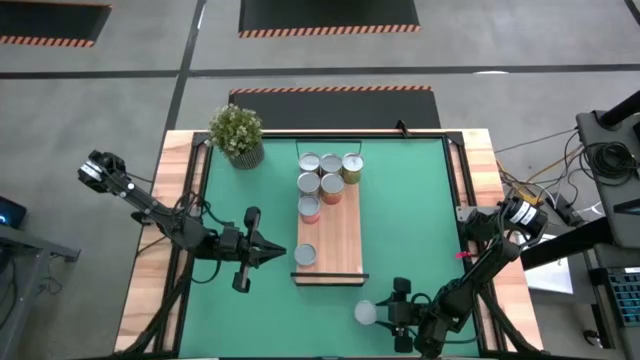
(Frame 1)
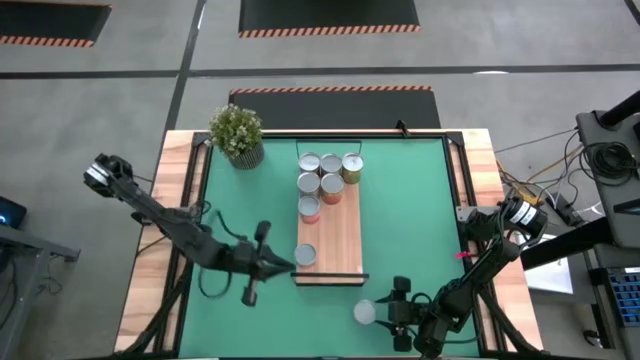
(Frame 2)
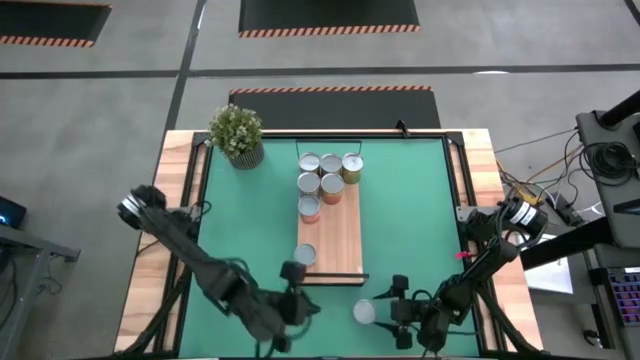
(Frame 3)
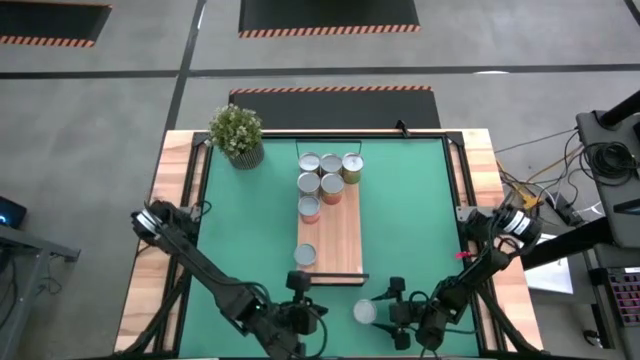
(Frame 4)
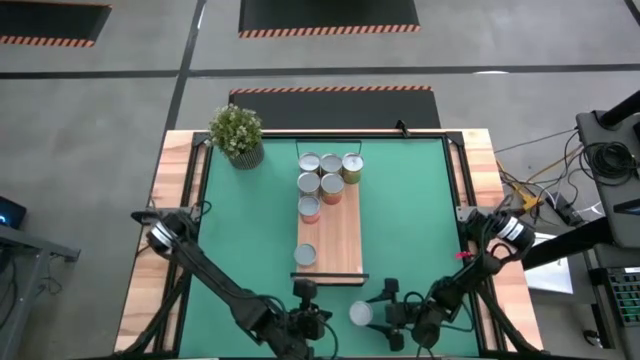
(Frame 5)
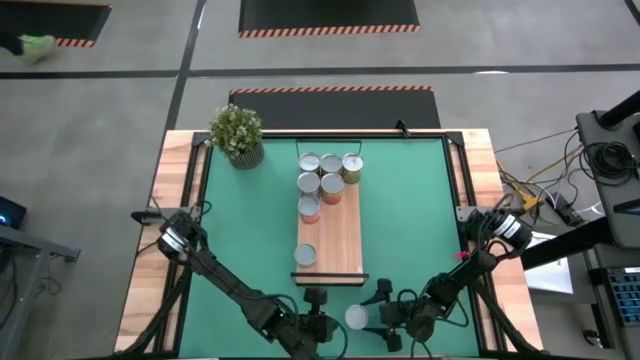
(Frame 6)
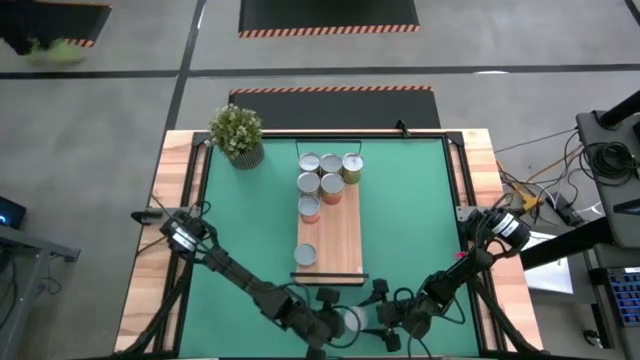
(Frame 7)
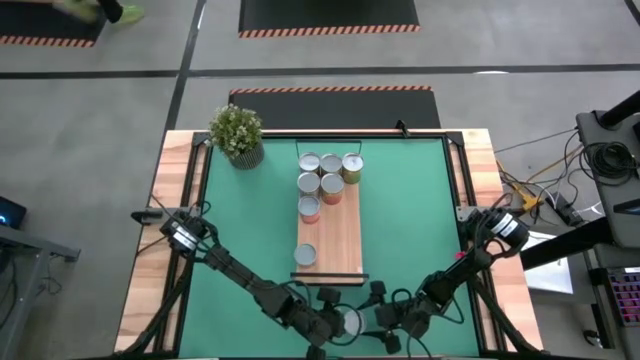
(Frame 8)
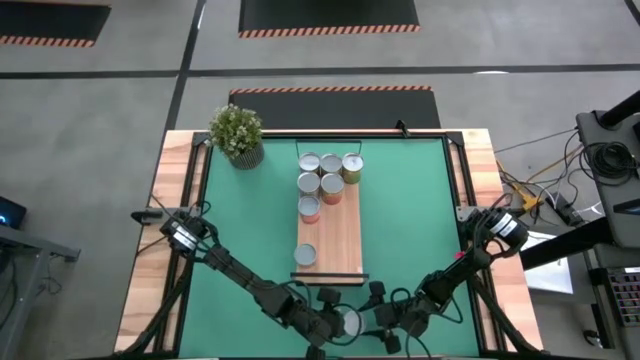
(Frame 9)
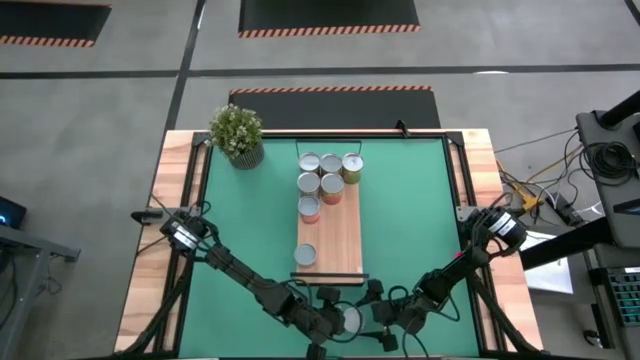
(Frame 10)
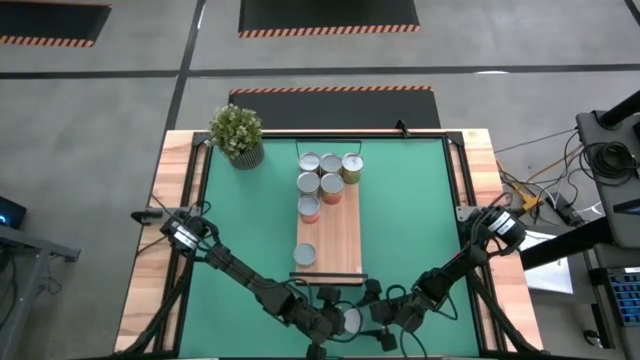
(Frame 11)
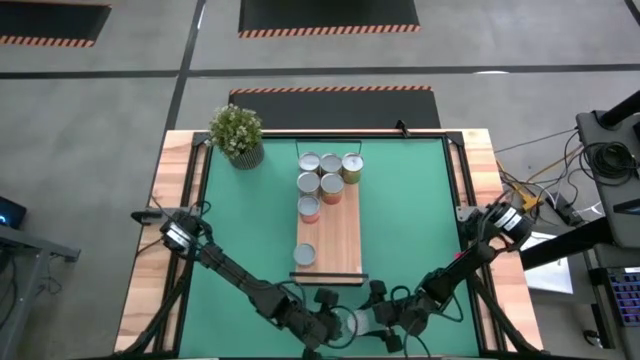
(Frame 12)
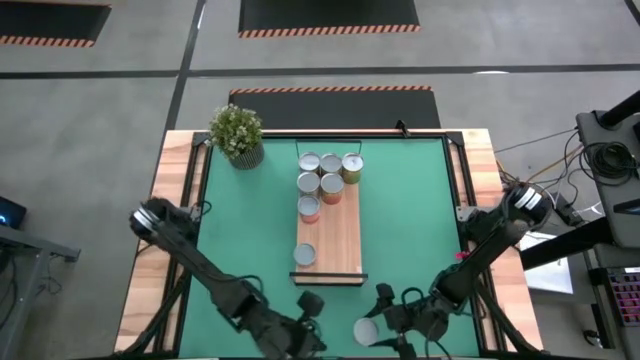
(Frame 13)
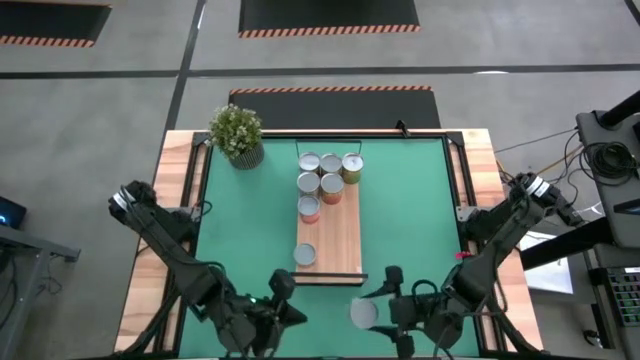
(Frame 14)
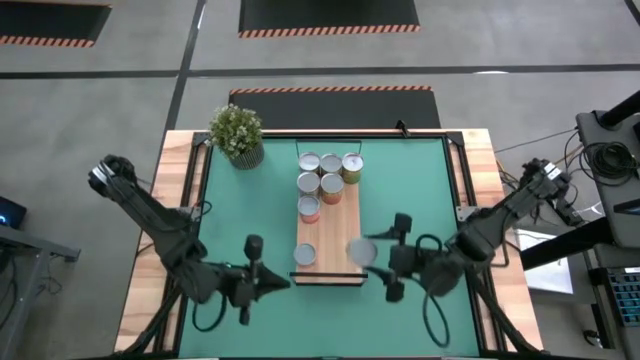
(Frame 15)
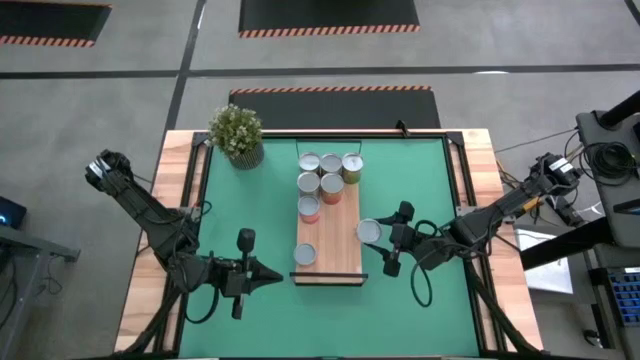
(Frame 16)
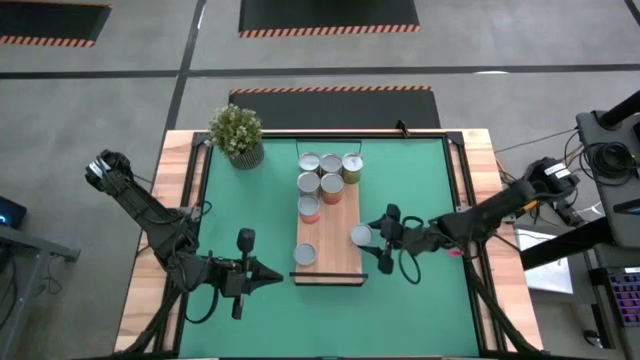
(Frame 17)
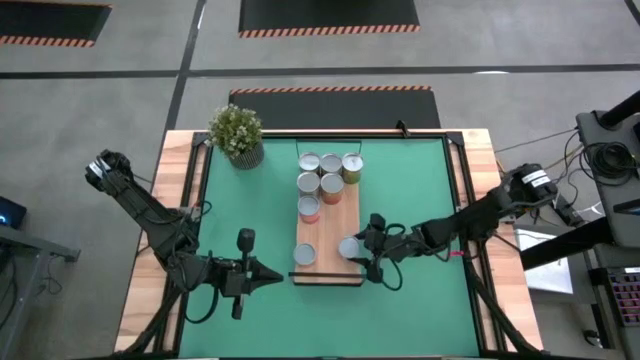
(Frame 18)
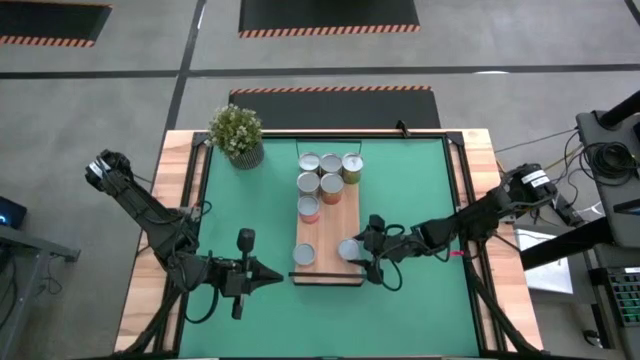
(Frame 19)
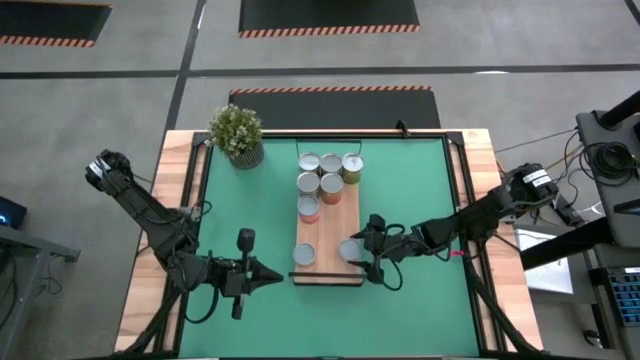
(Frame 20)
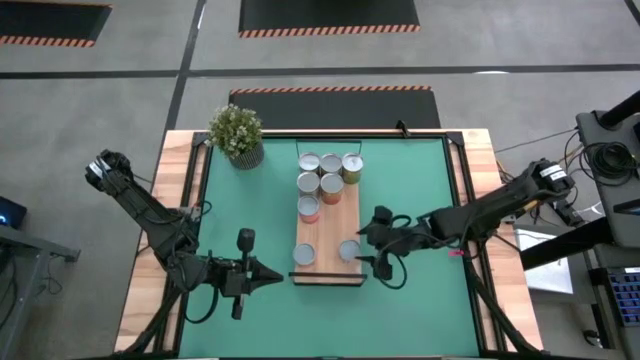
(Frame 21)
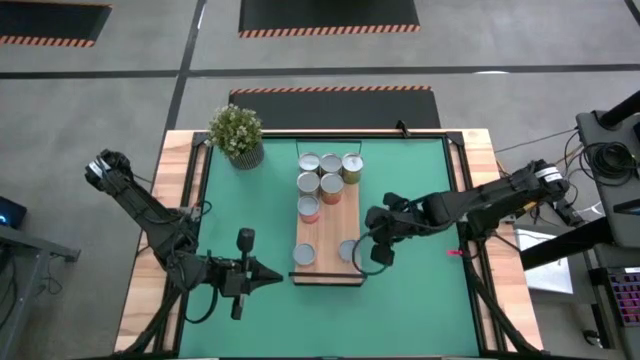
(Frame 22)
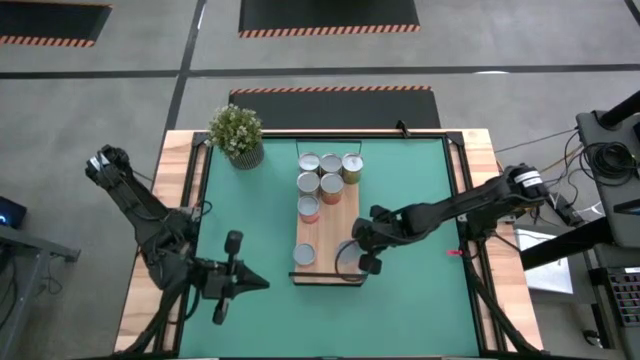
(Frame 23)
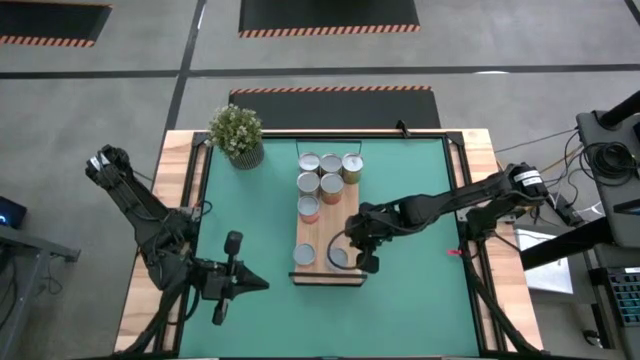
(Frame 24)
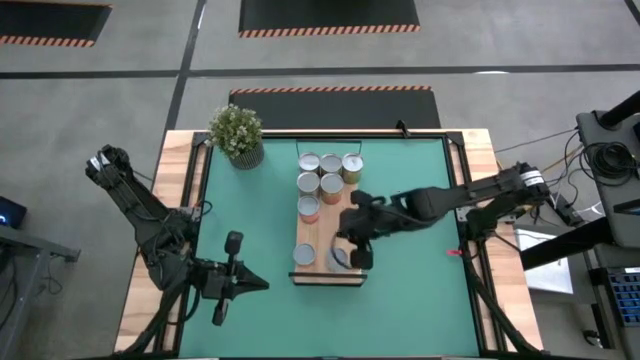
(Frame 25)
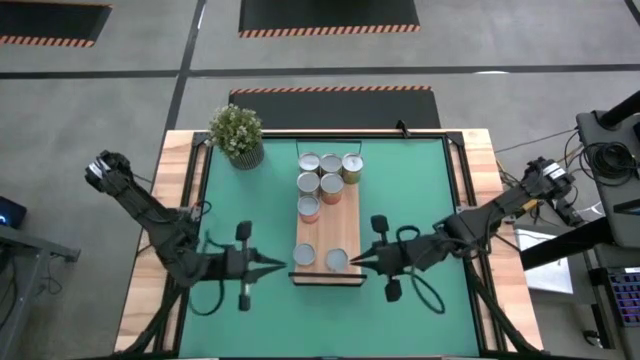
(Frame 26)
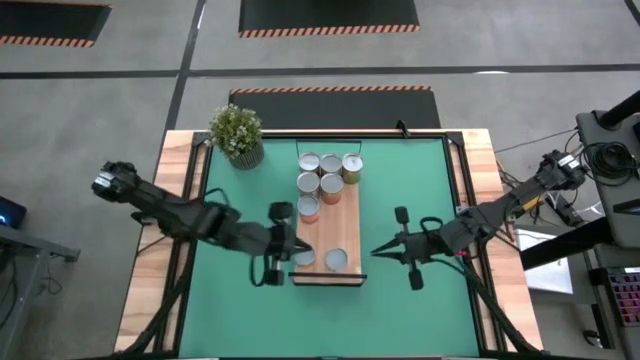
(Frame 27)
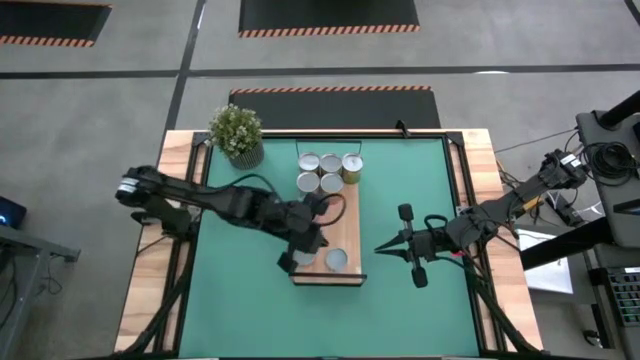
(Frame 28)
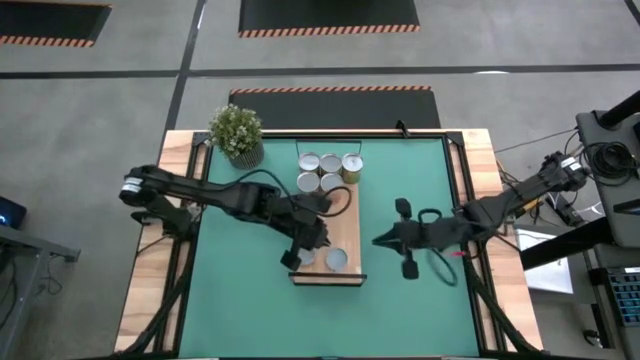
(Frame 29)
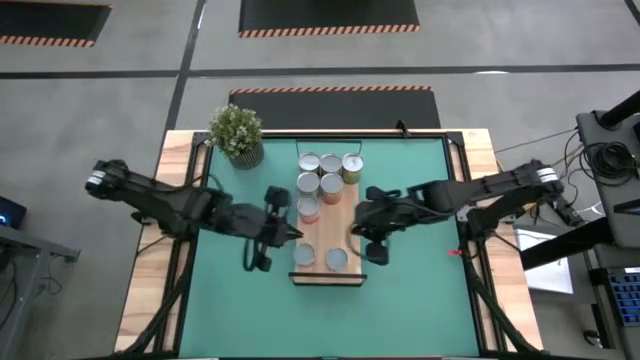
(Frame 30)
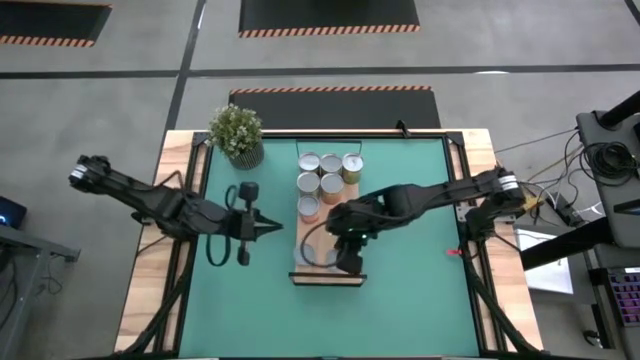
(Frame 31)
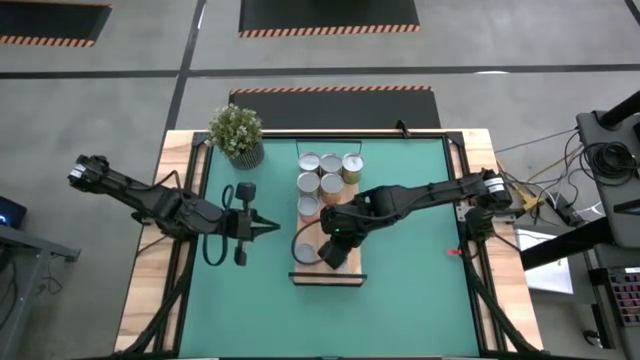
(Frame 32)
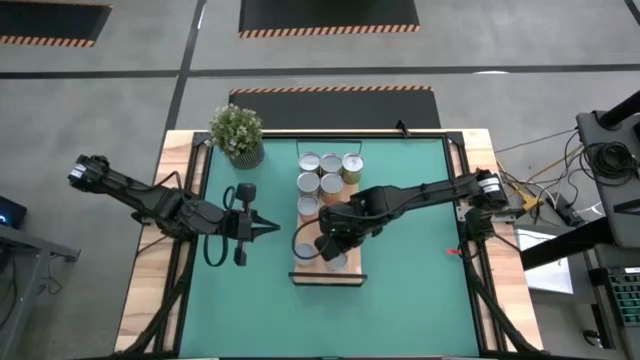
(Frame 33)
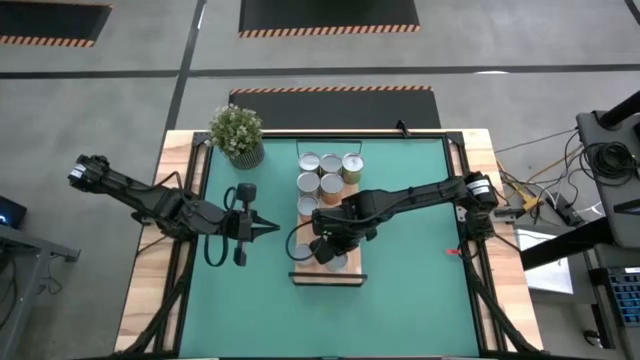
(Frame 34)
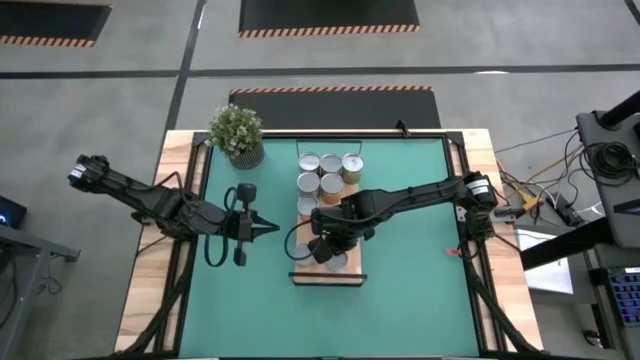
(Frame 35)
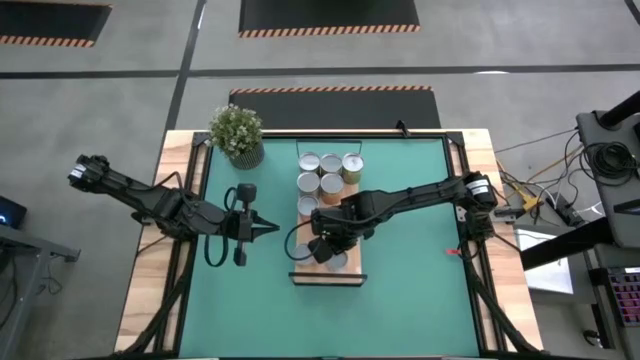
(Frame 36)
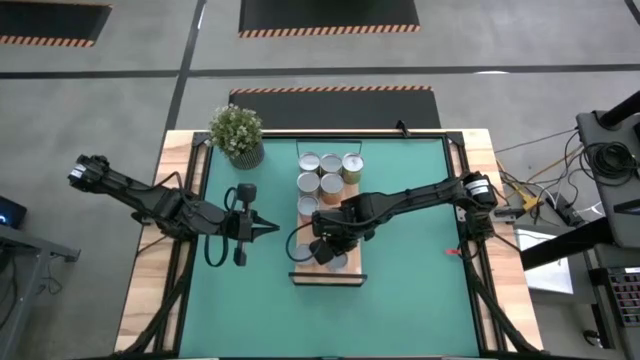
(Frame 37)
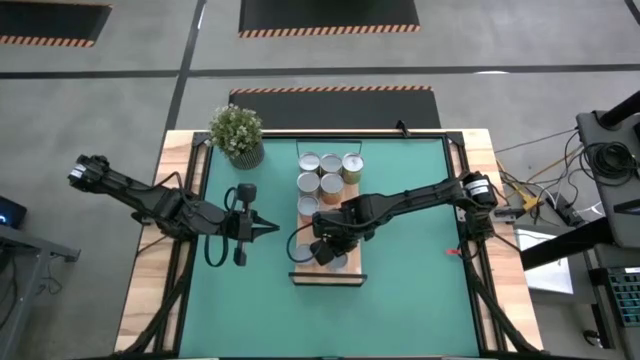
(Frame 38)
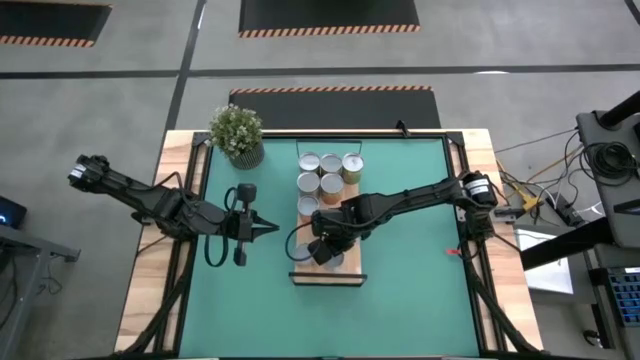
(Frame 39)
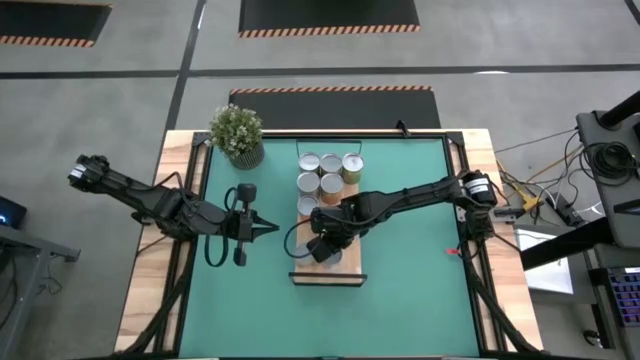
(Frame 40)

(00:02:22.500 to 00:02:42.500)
Task: Pick and place cans onto a shelf
Put the canned carrots on the shelf

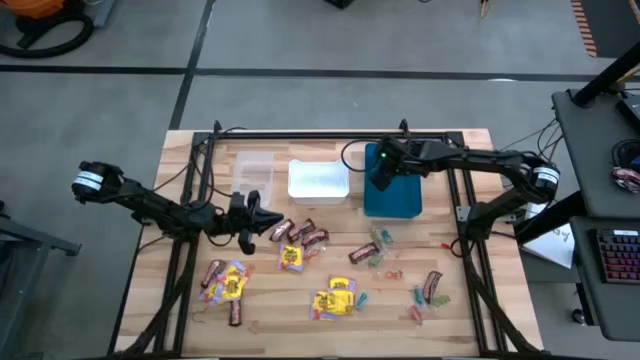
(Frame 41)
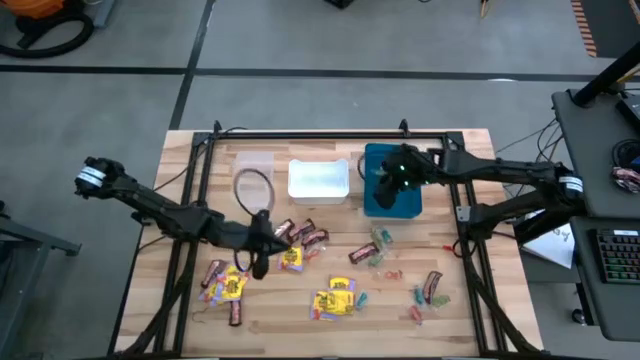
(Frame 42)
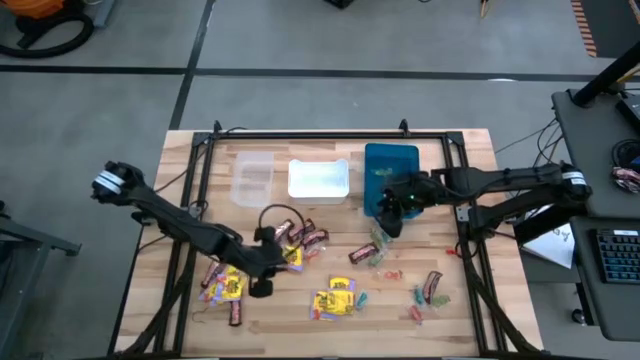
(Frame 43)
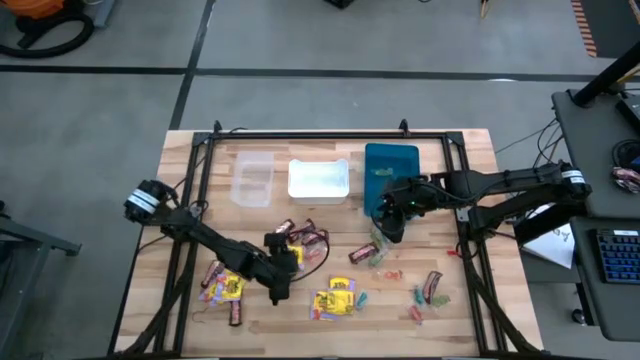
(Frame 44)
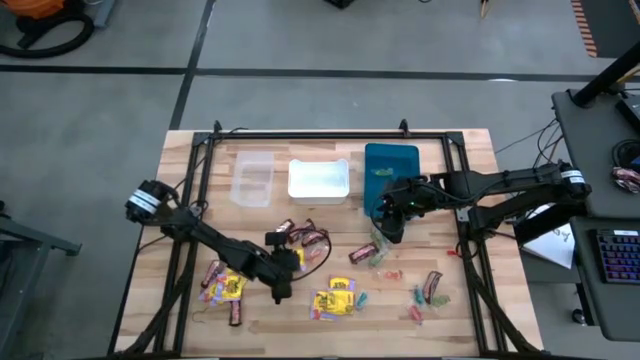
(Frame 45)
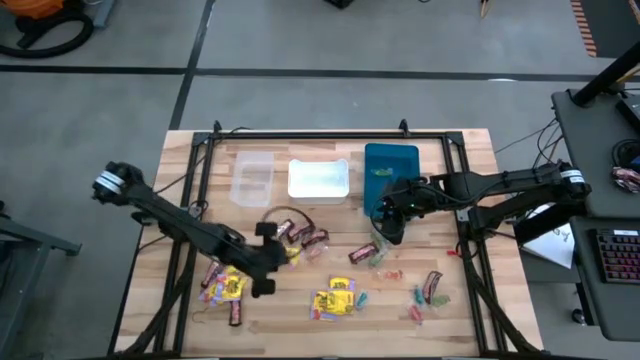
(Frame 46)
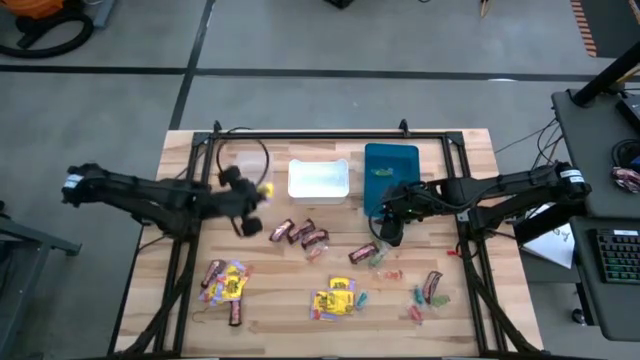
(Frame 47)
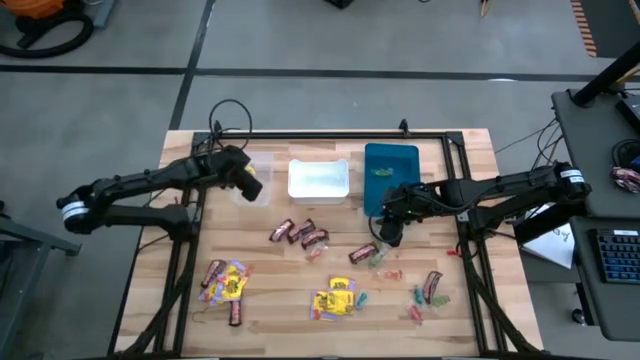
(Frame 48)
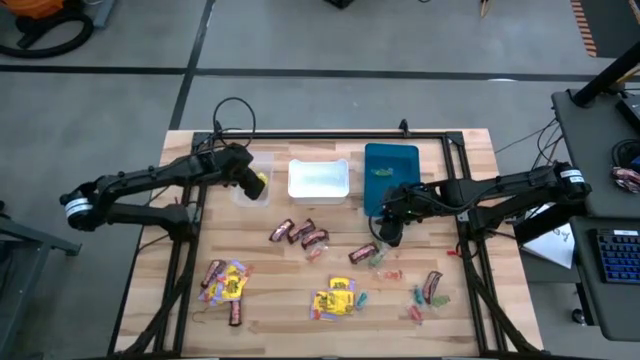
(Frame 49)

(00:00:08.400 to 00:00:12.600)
Task: Sort candy
Put the yellow candy into the transparent bin
